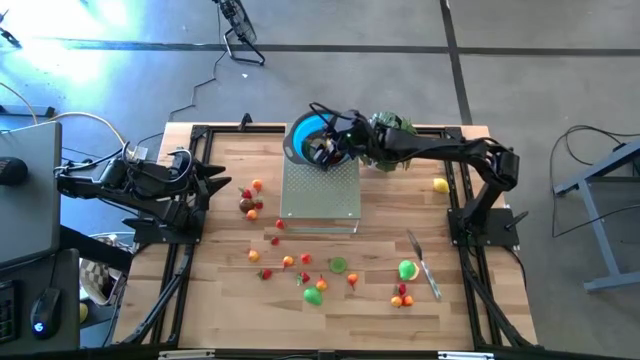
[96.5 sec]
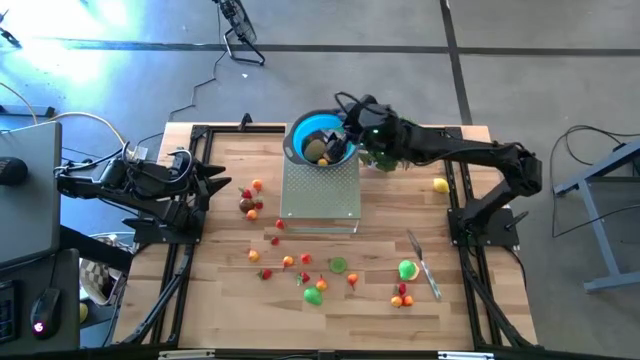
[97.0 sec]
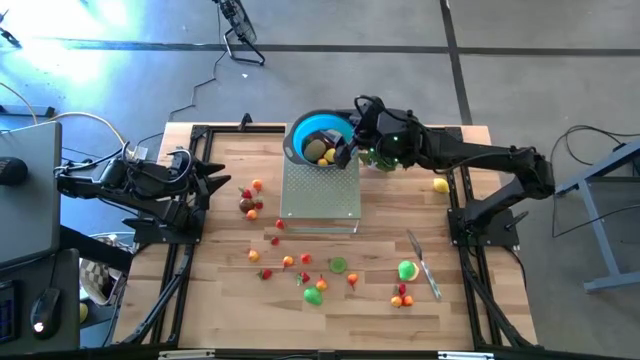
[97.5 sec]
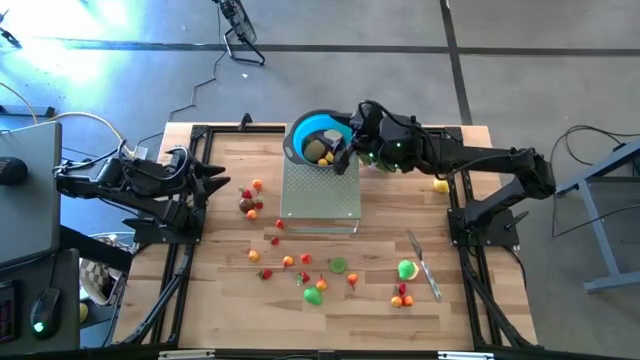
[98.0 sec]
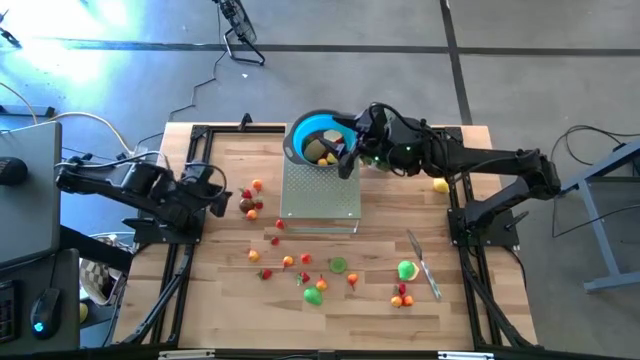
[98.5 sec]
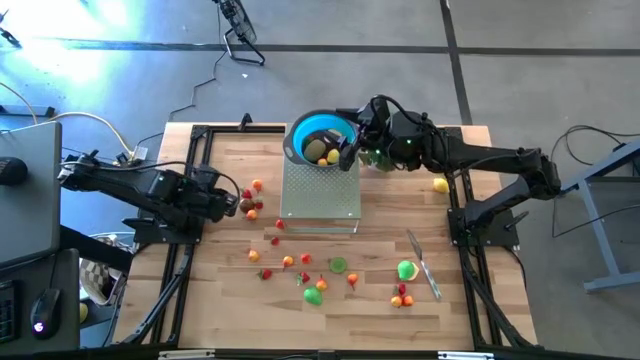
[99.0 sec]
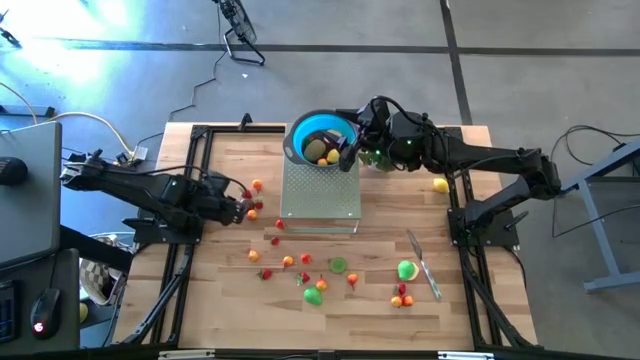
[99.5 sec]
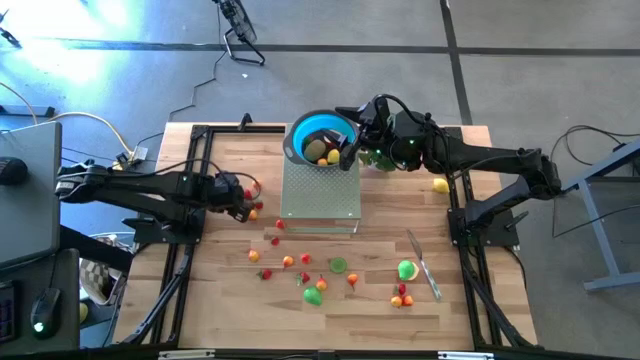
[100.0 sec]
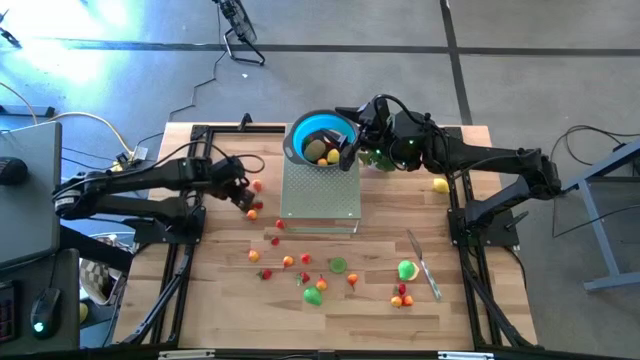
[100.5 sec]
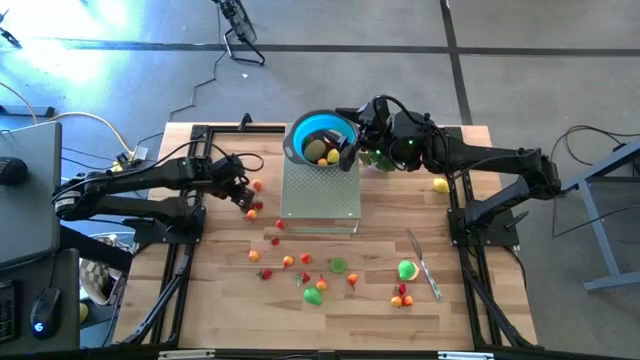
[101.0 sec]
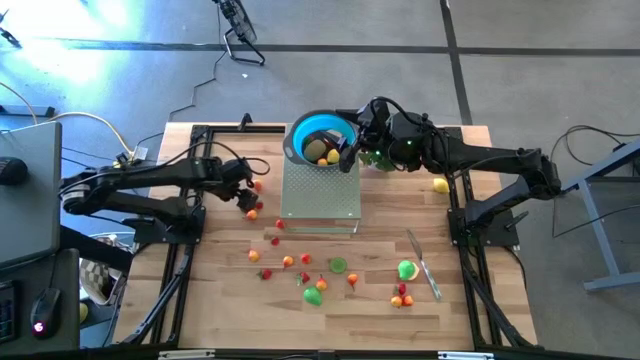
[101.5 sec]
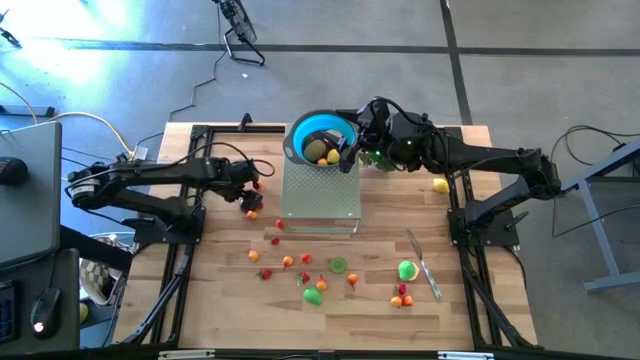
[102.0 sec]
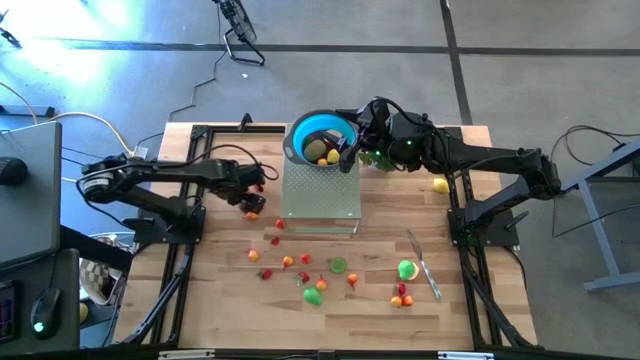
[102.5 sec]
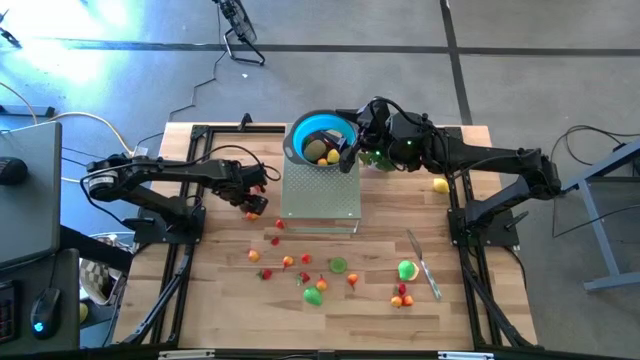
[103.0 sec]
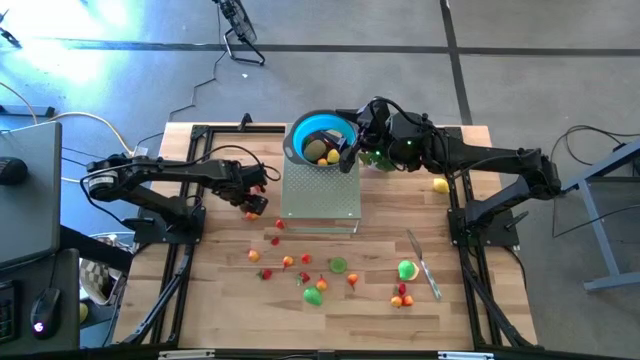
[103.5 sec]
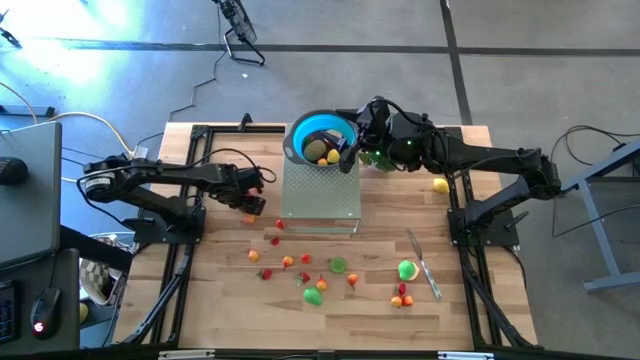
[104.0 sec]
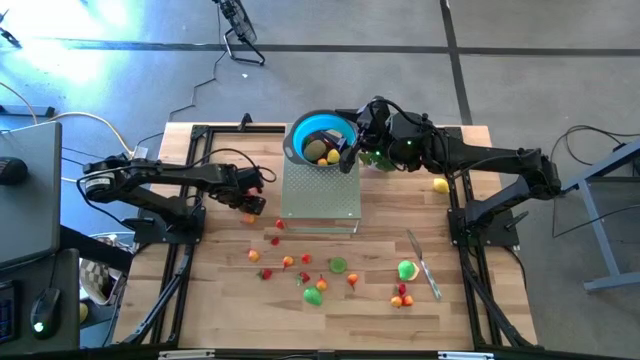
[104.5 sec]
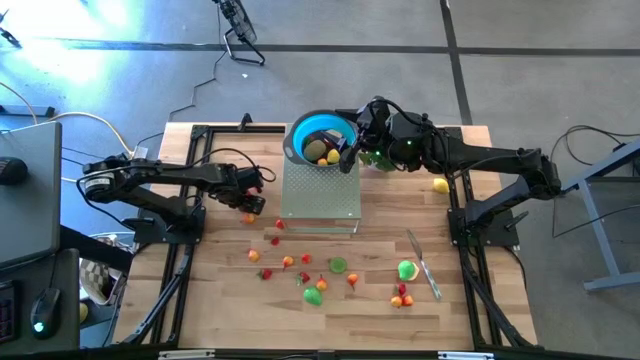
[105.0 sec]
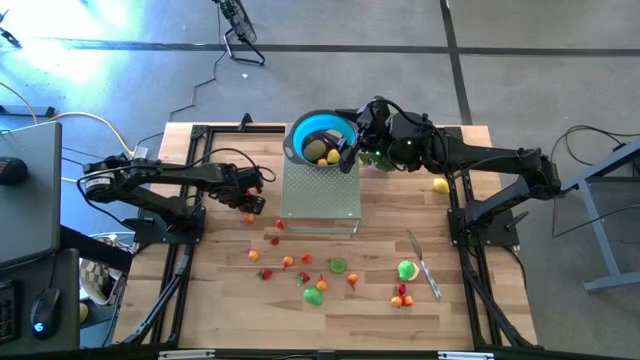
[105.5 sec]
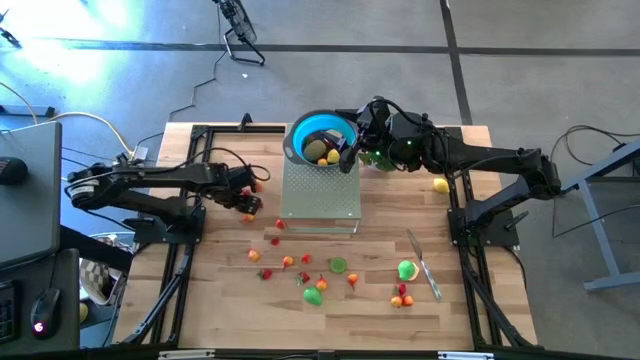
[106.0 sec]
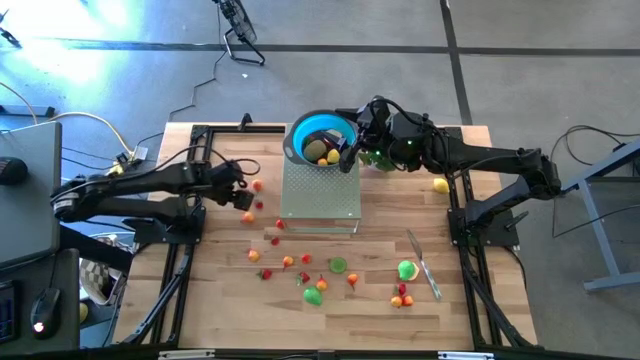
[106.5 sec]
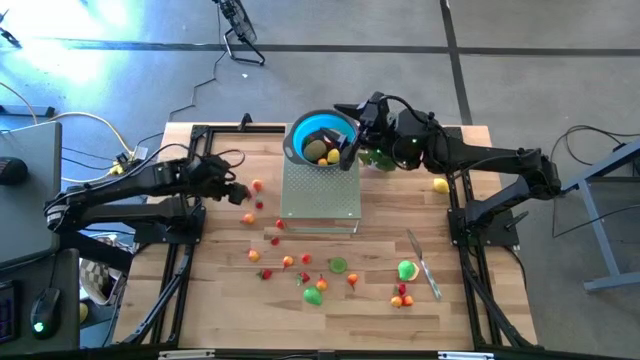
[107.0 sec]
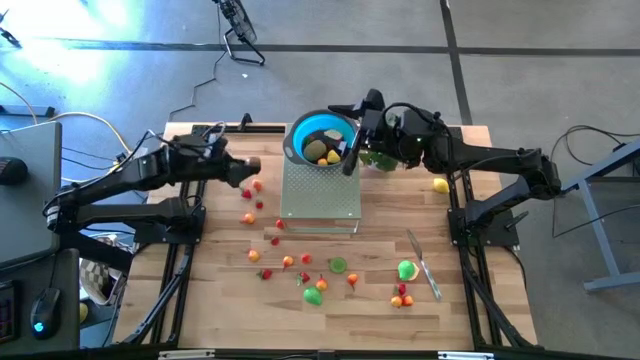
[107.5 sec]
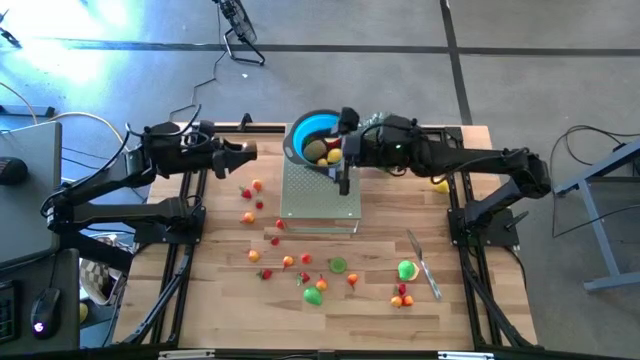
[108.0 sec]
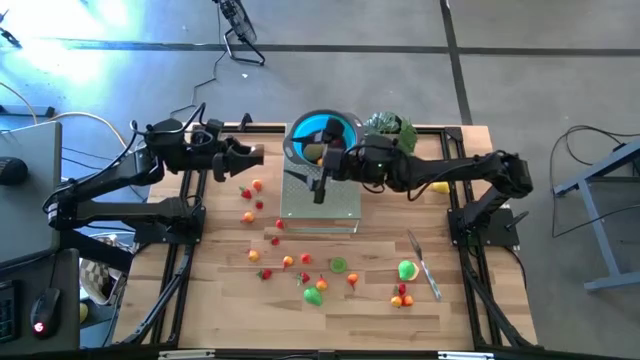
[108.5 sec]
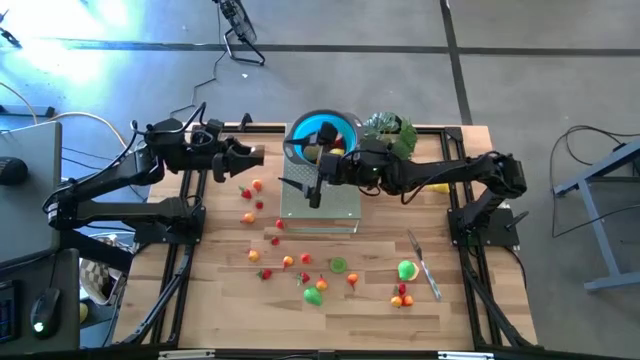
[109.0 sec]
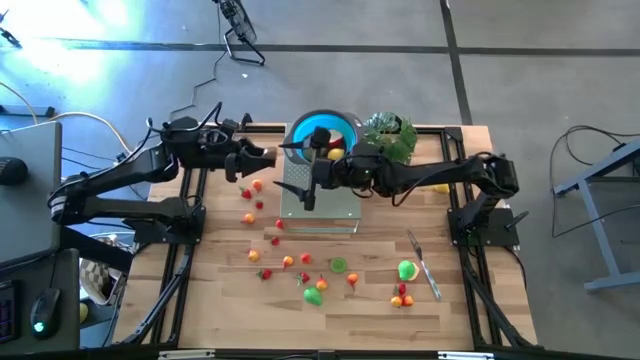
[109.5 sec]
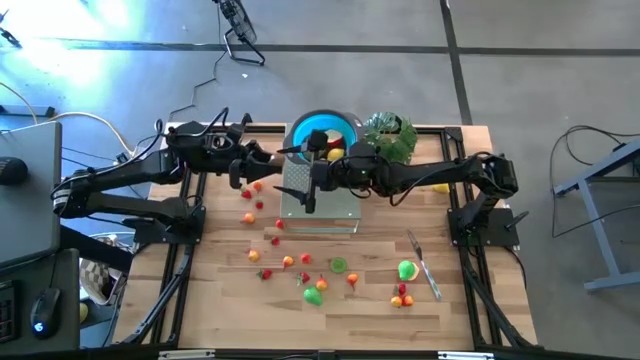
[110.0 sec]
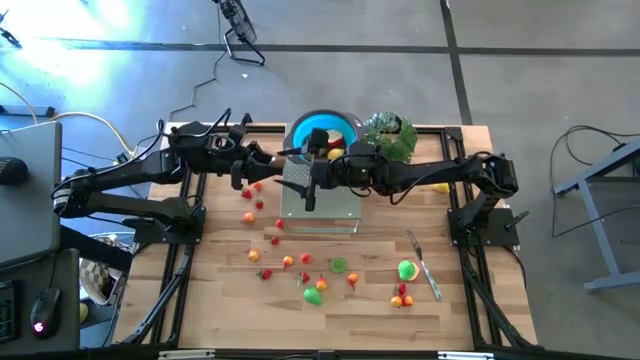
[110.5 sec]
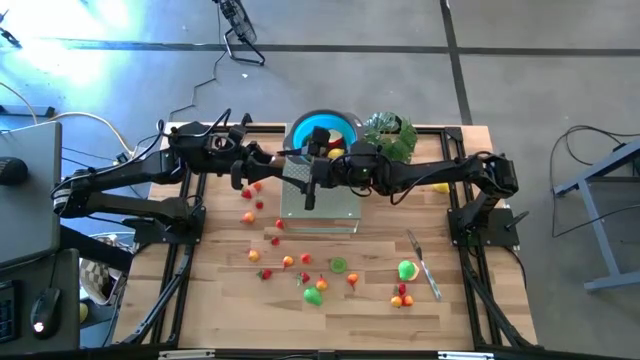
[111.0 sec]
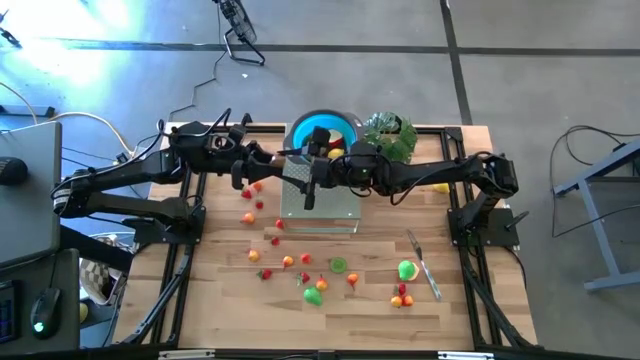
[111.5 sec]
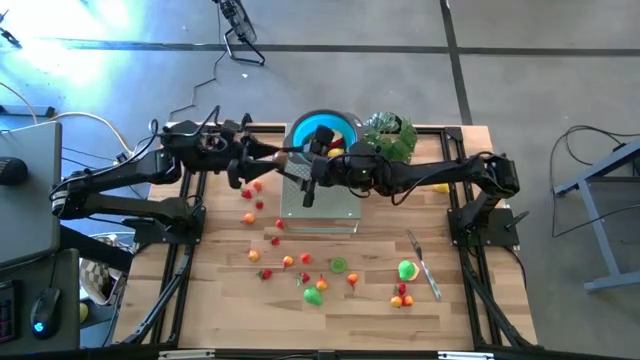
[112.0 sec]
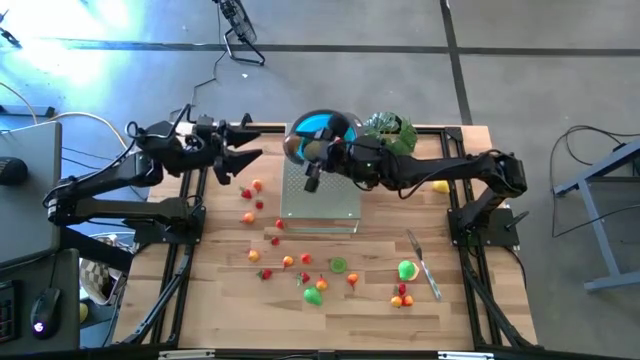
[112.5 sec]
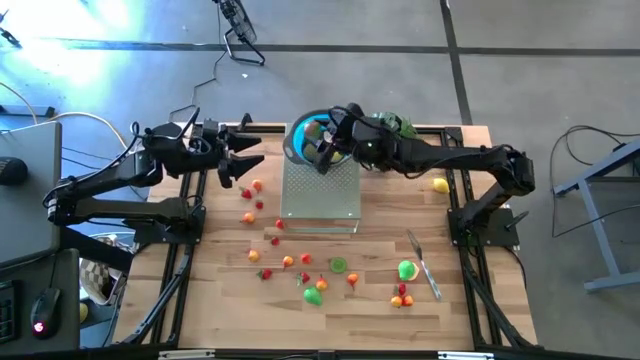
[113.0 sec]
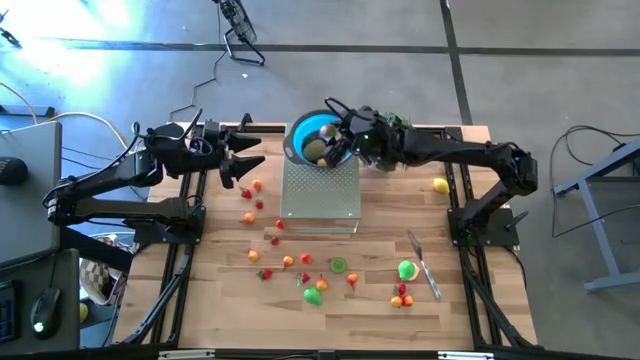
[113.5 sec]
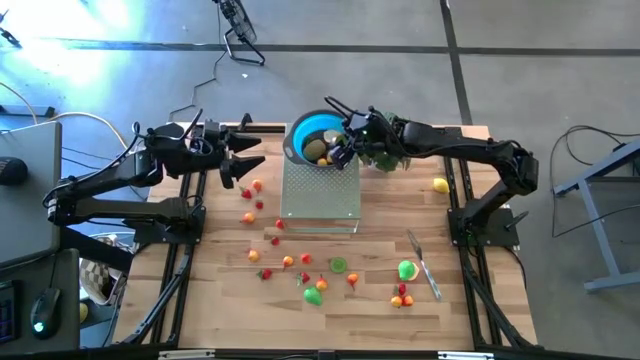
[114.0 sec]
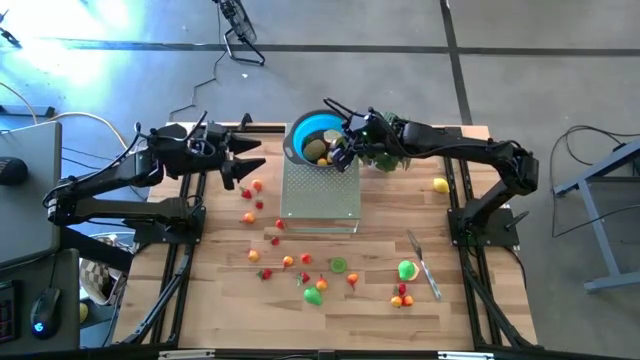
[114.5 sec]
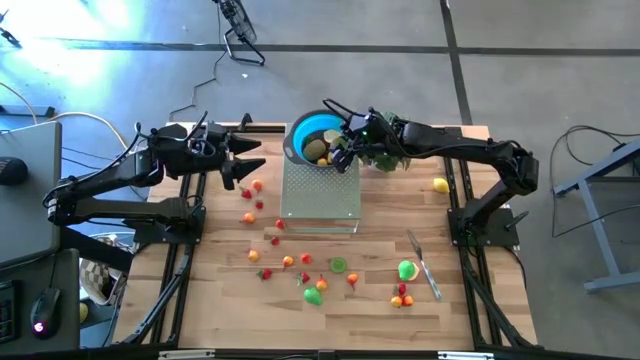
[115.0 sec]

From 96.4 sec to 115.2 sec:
Task: Pick & Place Fruit
Put the brown kiwi in the blue bowl on the shelf

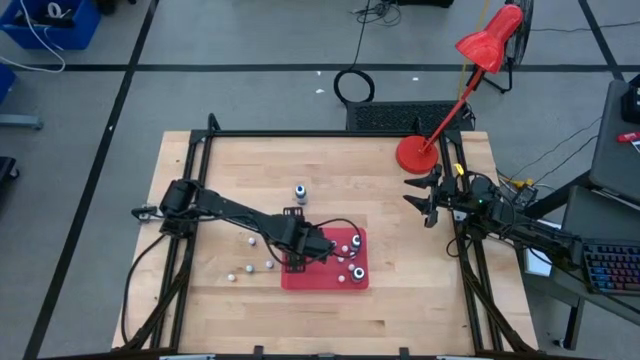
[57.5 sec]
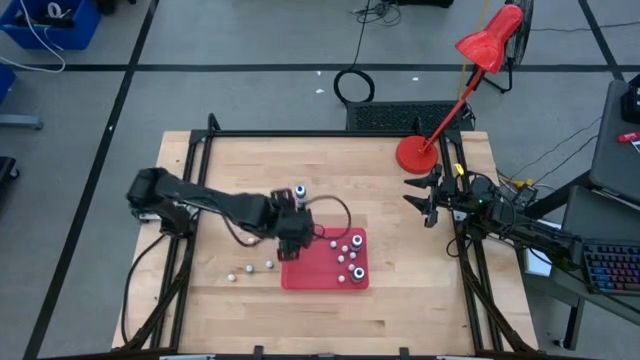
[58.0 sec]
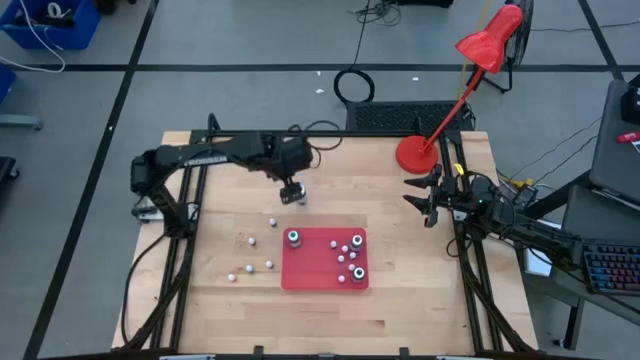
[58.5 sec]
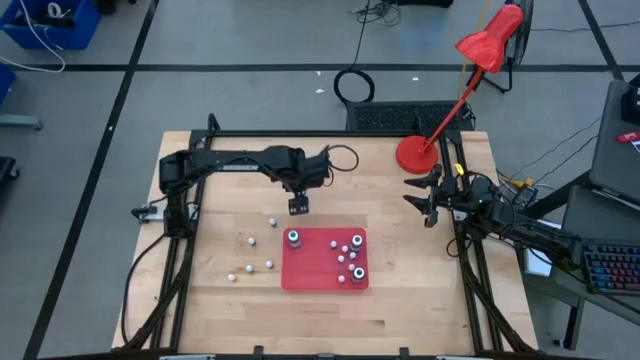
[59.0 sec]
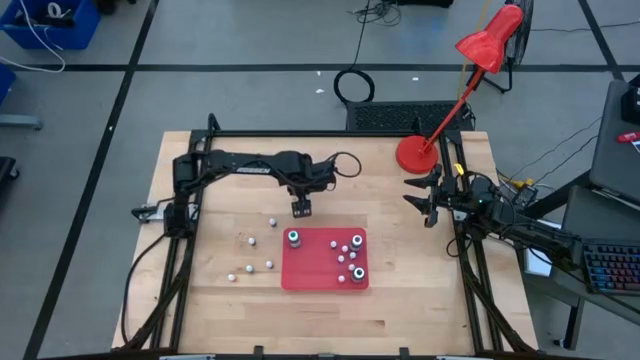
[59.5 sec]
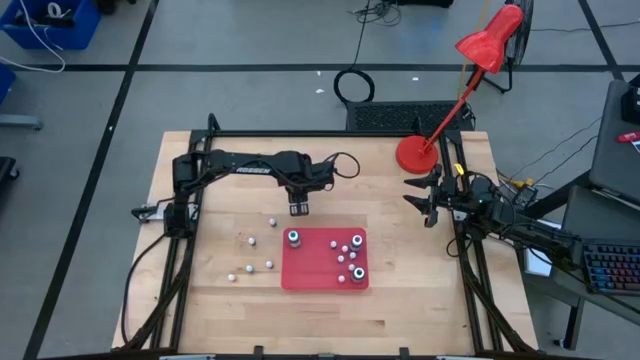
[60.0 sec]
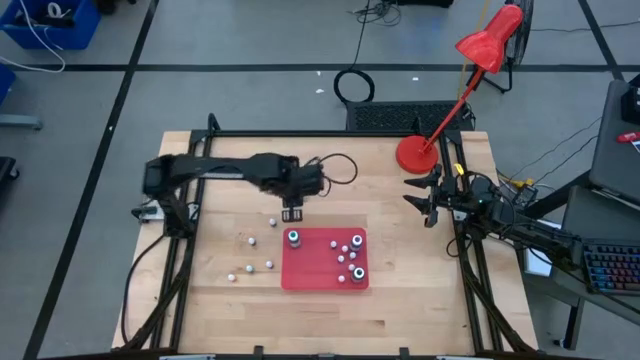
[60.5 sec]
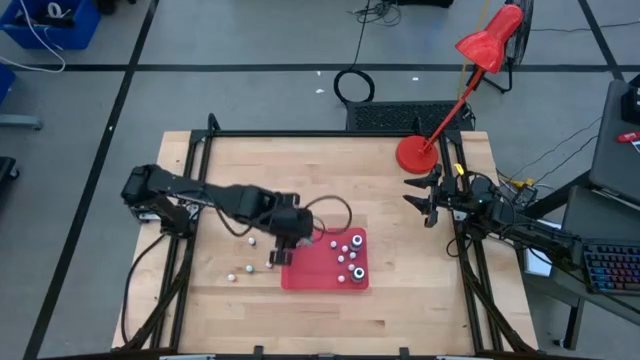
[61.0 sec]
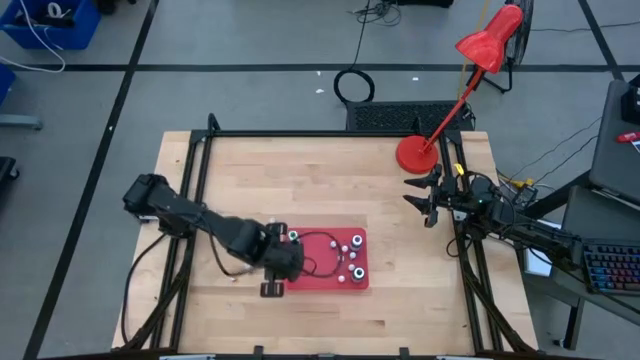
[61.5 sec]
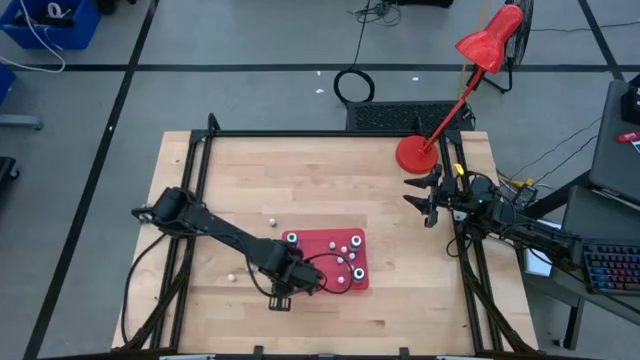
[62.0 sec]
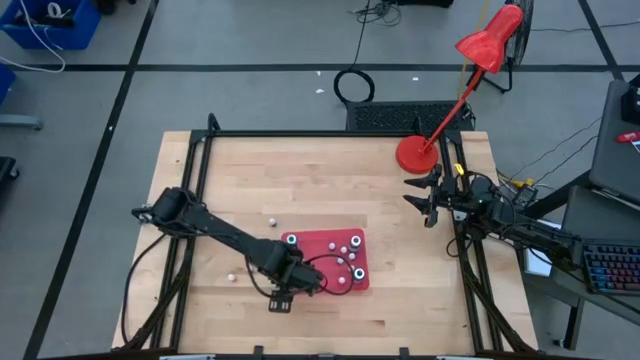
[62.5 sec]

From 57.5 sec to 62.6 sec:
Task: Pick & Place food coloring
Put the large blue food coloring bottle into the pink bin
